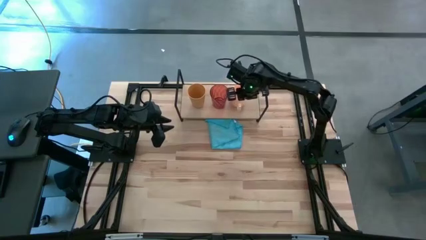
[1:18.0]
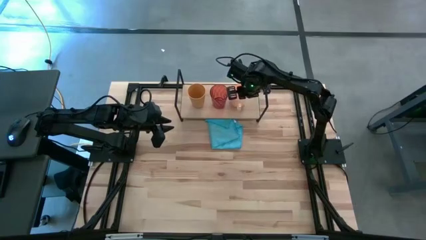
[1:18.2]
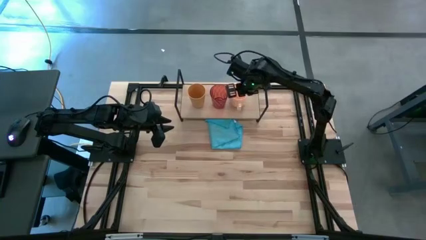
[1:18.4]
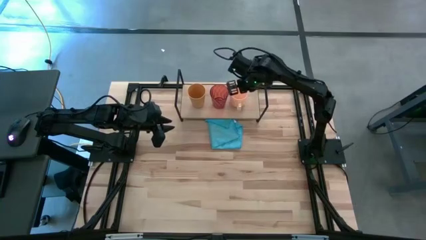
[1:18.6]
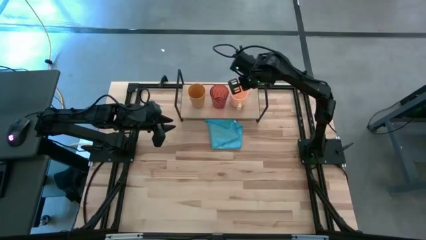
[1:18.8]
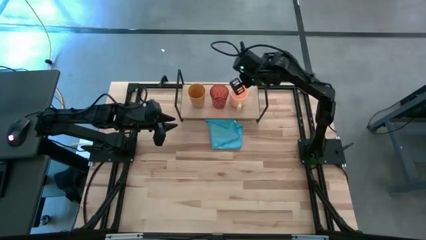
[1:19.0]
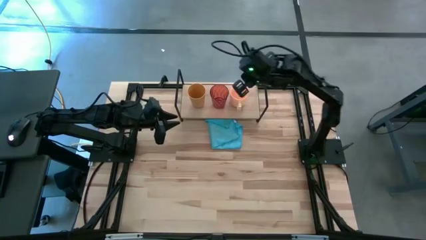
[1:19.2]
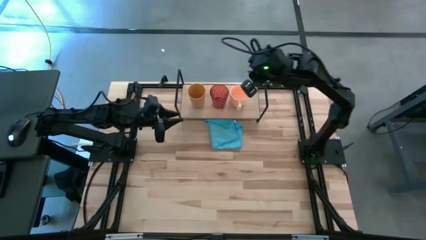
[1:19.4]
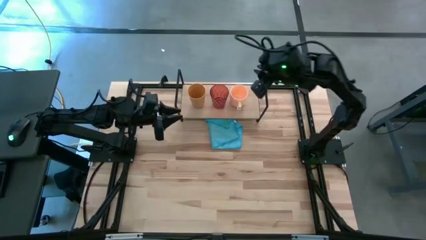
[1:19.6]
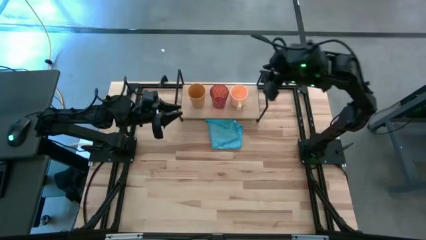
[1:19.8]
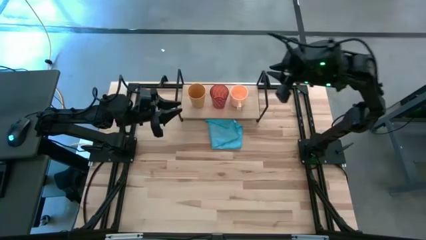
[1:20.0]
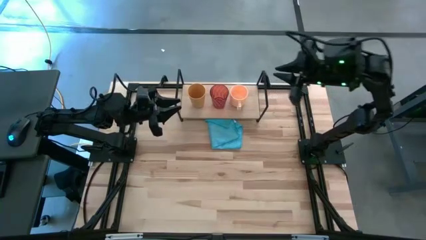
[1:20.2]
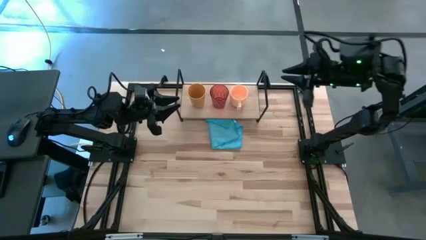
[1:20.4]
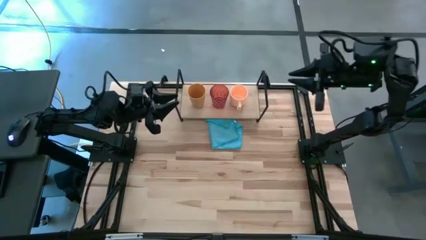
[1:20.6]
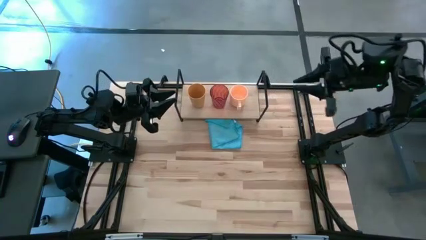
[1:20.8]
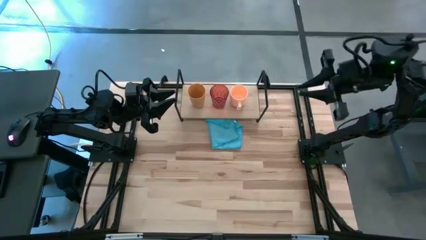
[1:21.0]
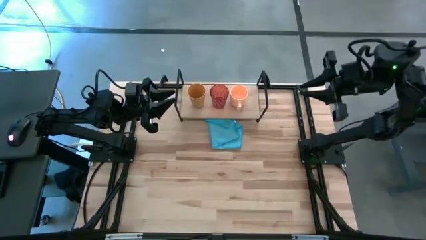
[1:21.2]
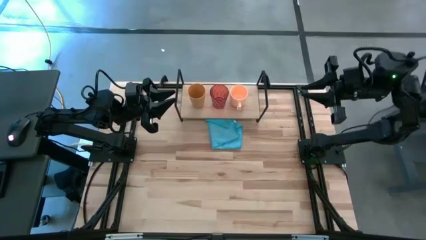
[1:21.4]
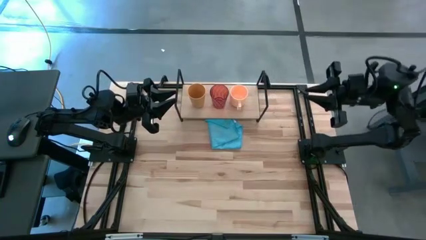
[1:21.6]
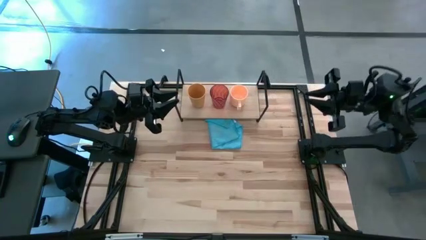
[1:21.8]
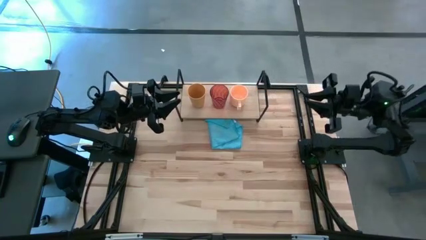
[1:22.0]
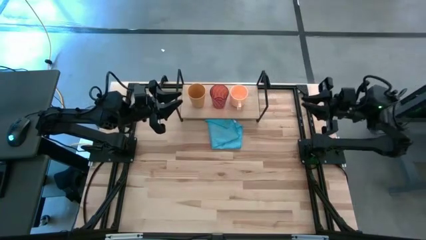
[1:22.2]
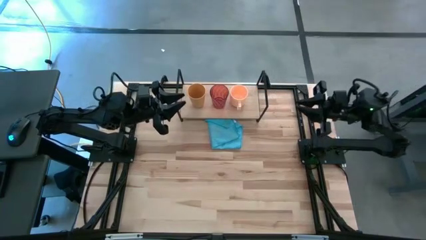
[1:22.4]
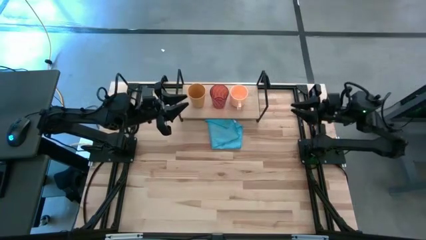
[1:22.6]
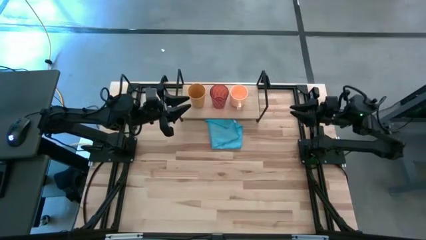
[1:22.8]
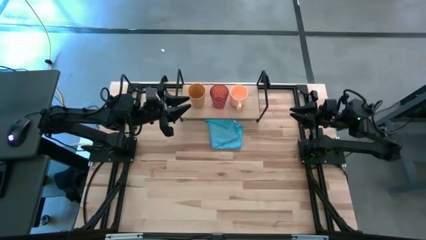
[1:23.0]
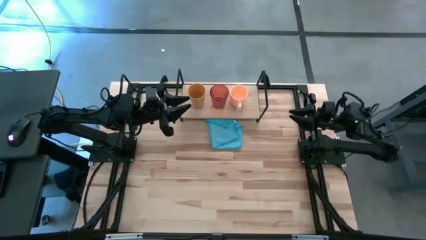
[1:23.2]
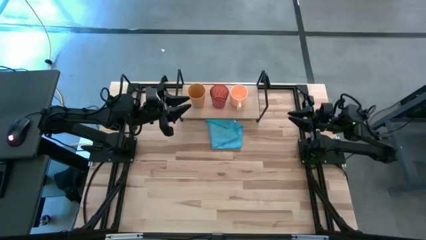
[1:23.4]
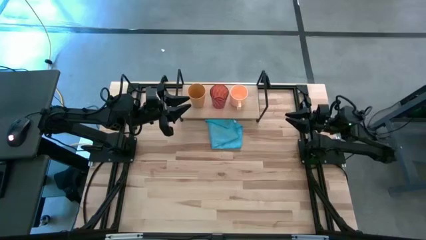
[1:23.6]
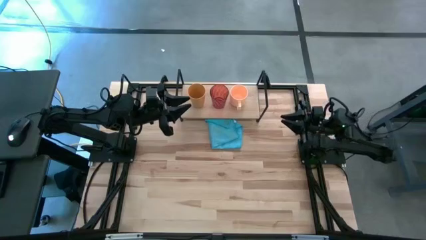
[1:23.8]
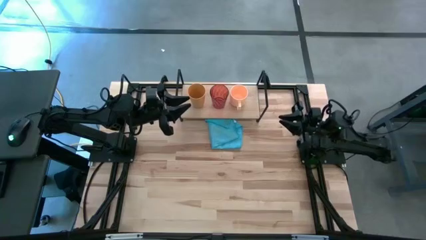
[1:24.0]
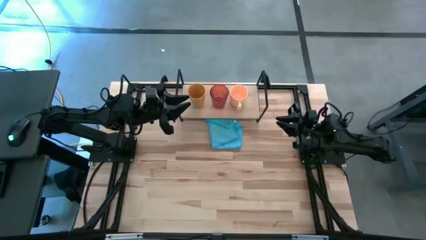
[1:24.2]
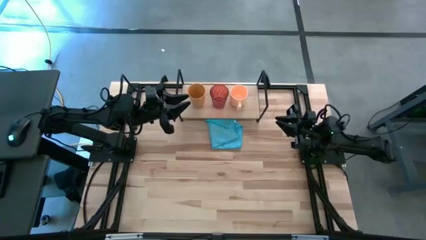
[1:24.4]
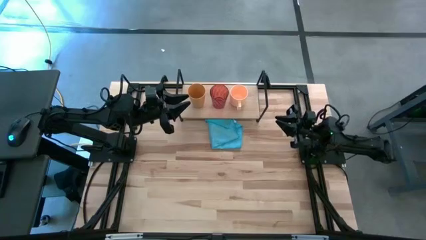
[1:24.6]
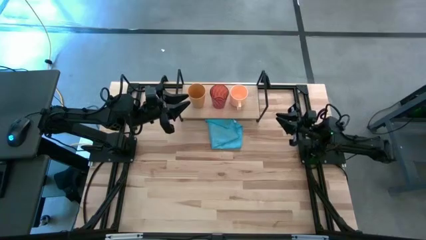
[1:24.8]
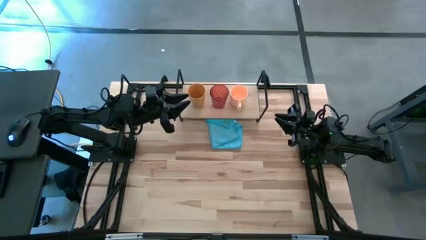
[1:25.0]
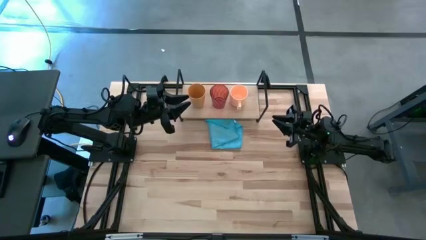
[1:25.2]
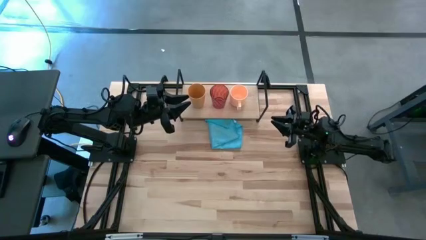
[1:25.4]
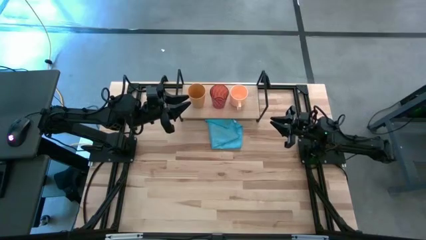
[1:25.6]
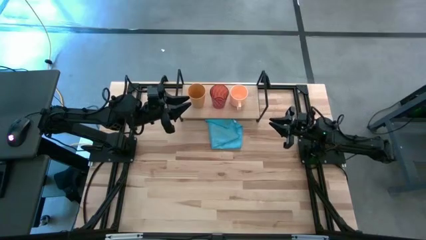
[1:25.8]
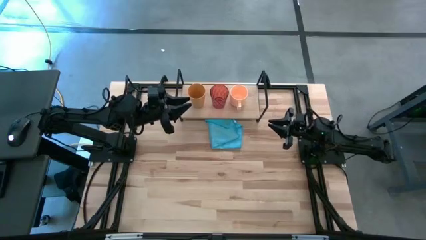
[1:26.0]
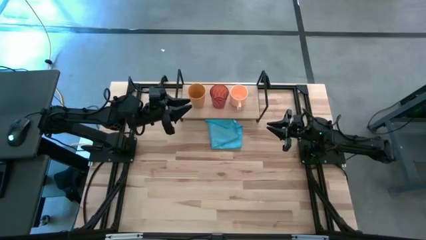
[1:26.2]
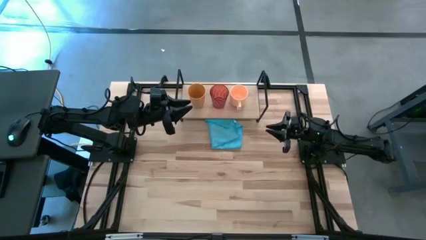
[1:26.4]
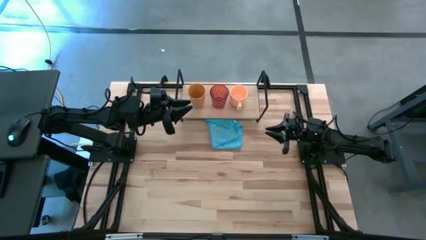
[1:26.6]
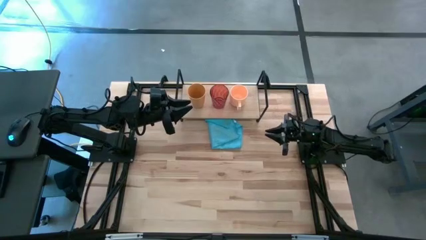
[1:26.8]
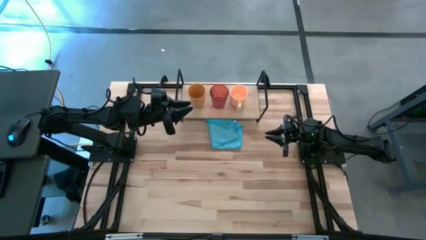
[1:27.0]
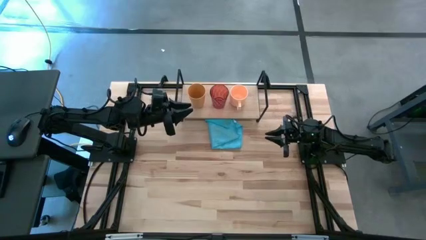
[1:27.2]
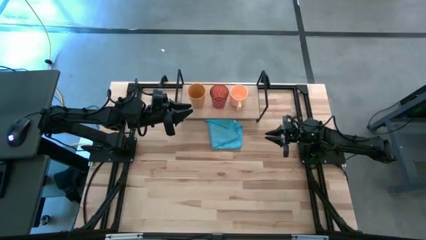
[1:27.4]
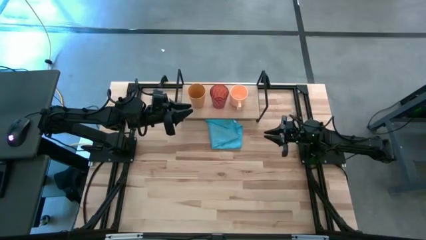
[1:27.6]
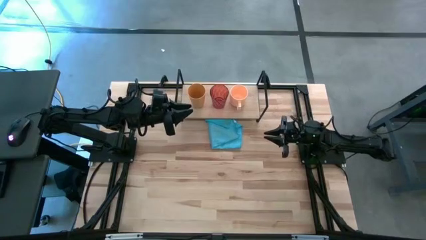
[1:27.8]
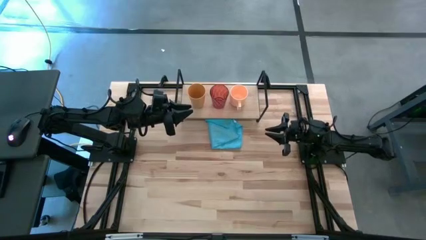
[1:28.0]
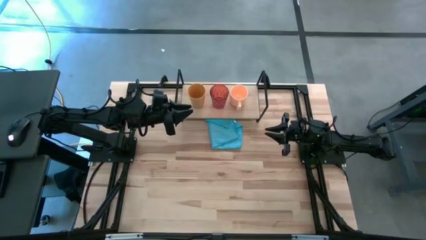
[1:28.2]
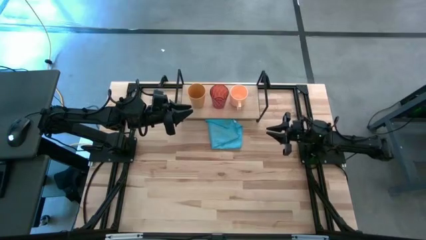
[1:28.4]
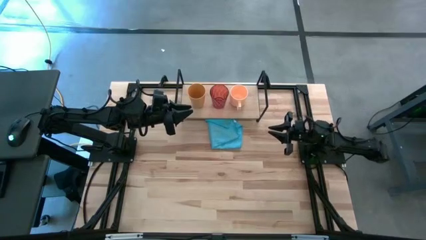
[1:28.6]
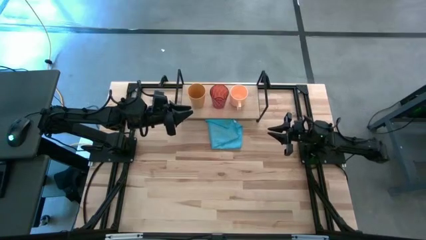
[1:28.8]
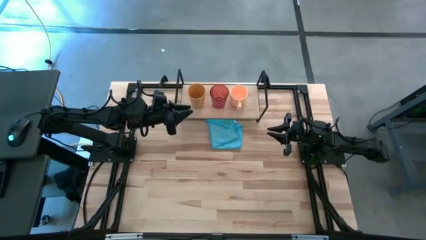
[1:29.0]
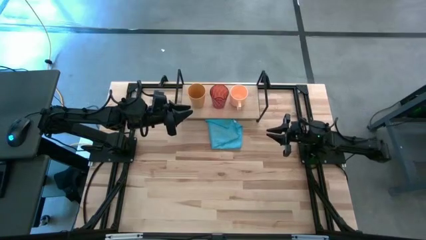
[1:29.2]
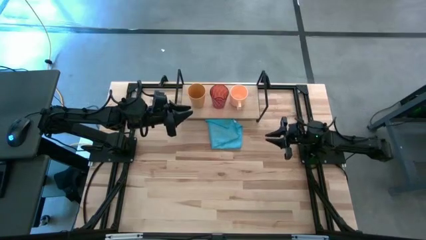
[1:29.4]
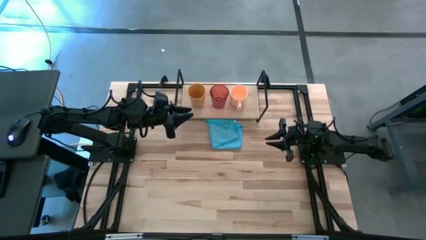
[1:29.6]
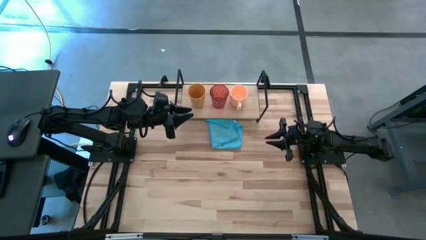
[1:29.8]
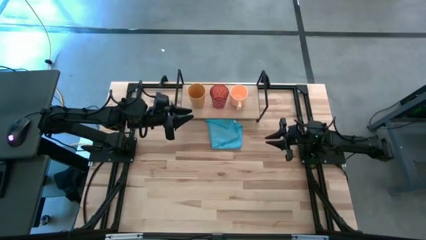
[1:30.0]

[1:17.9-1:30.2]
Task: Stack small to large cups/mugs on shelf
Return to Home Position

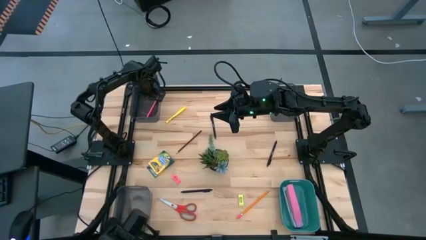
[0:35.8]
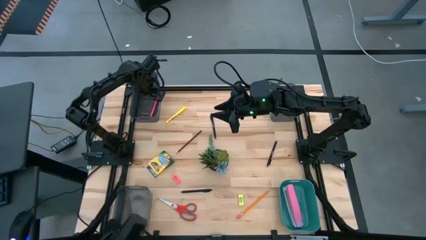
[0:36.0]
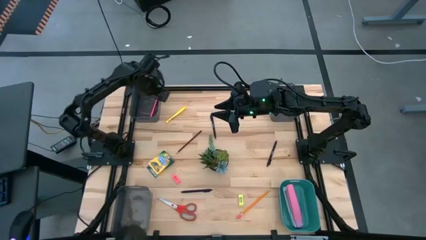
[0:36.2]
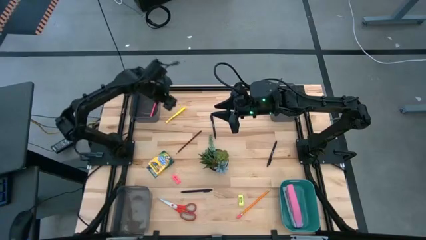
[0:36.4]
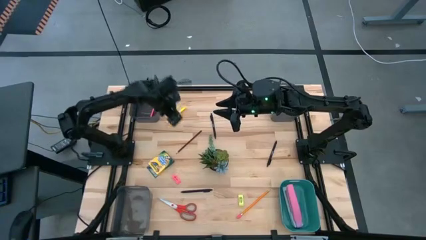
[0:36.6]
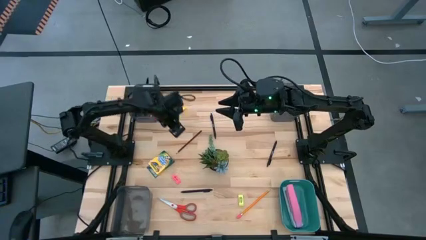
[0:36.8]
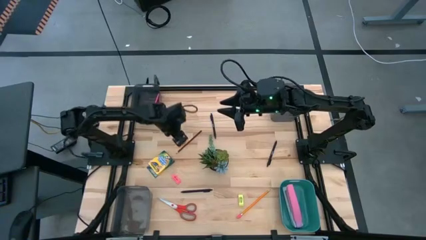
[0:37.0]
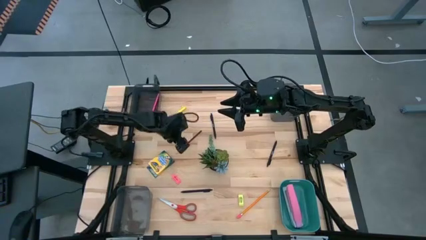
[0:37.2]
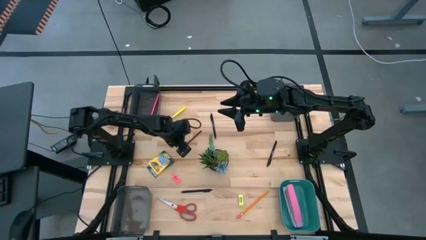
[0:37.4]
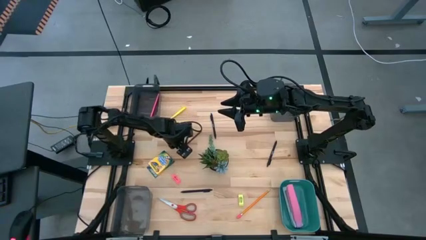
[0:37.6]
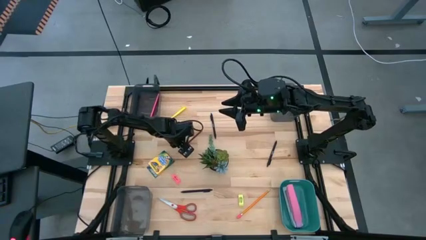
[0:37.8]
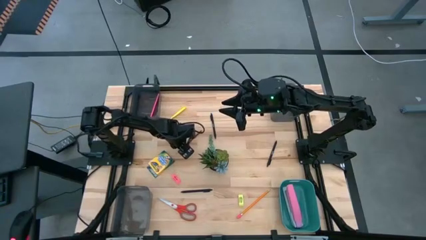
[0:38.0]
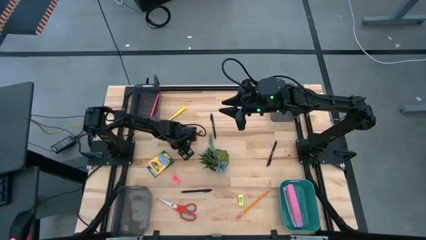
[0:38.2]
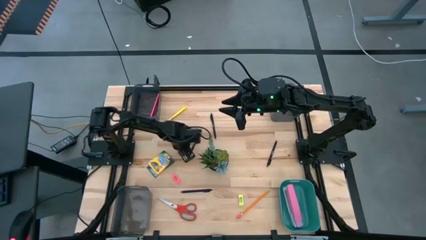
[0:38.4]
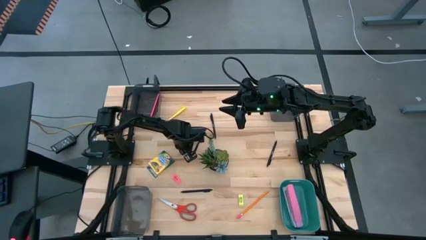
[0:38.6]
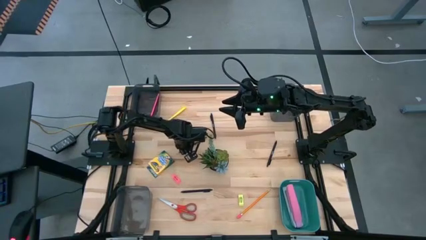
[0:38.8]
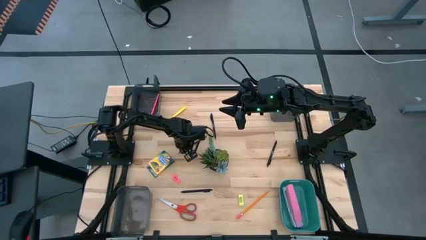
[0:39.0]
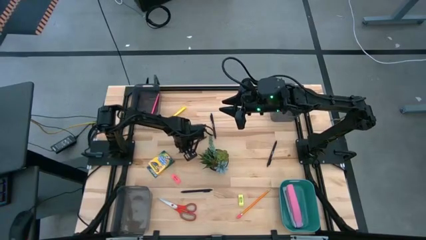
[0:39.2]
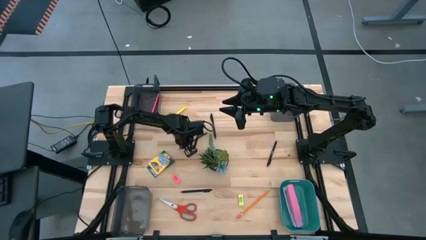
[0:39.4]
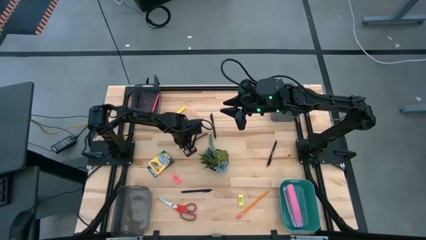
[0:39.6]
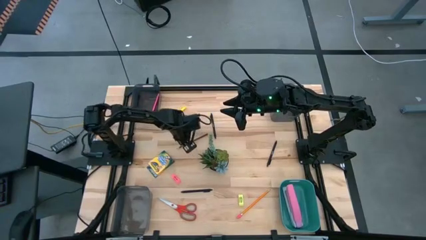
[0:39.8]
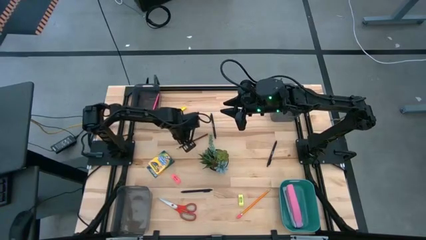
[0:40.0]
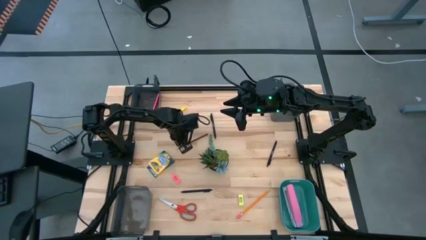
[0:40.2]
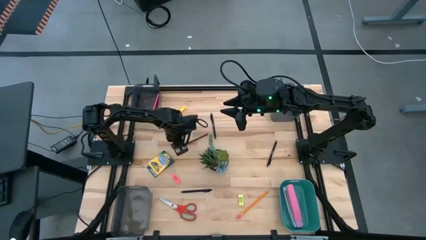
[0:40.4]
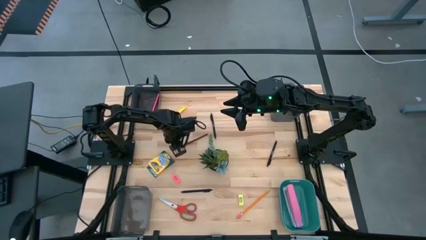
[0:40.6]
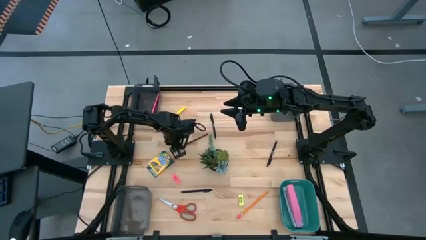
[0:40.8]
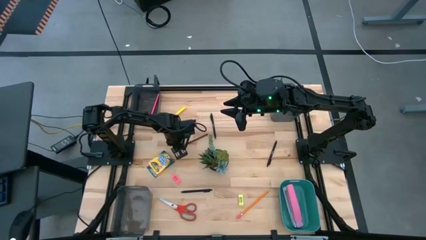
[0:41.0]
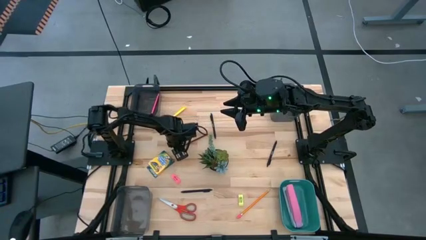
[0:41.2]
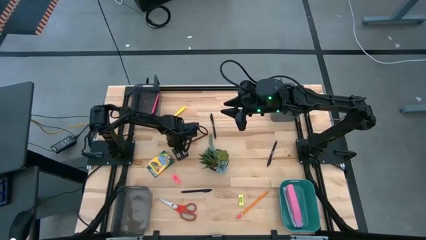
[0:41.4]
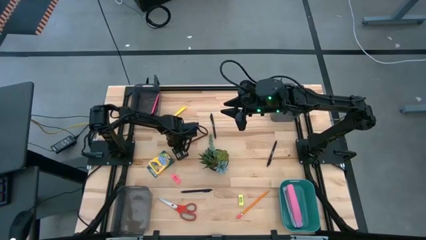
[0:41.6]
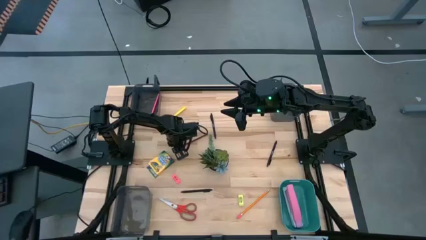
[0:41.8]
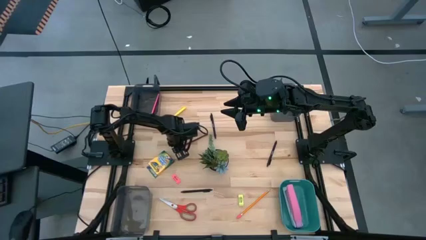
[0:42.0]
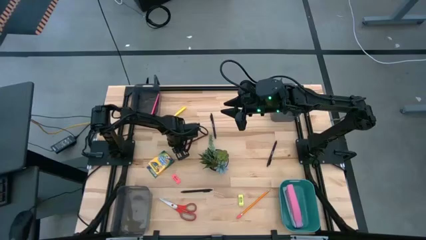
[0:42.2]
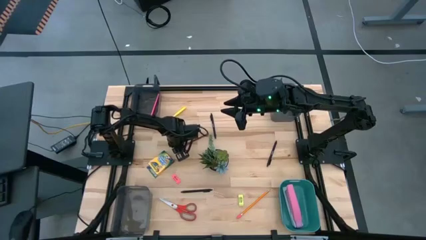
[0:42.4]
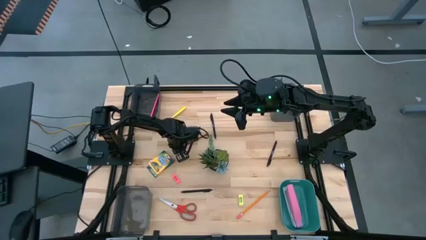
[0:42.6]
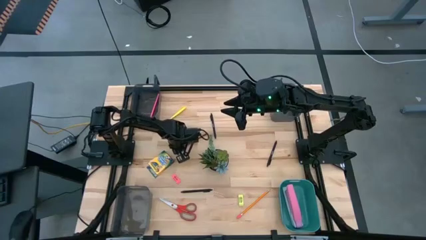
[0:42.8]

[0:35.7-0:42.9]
Task: Sort crayons/erasers/pens/pencils in bins
Put the brown pencil into the top left black bin
